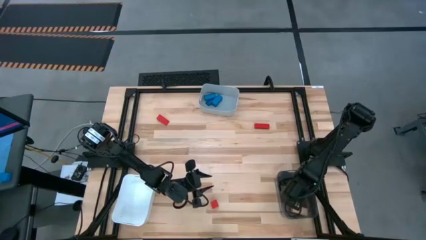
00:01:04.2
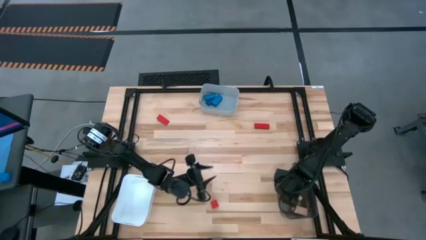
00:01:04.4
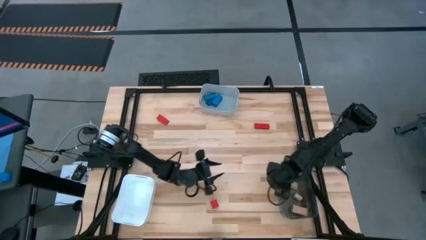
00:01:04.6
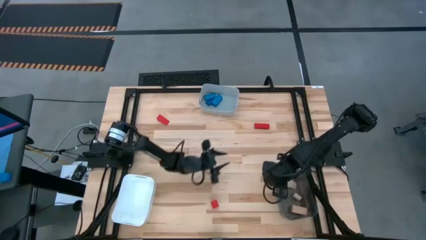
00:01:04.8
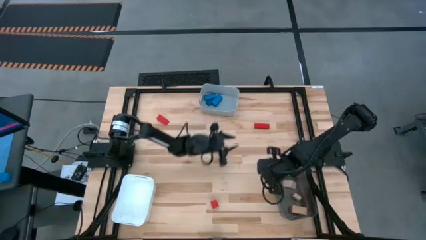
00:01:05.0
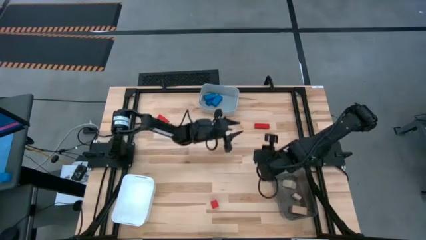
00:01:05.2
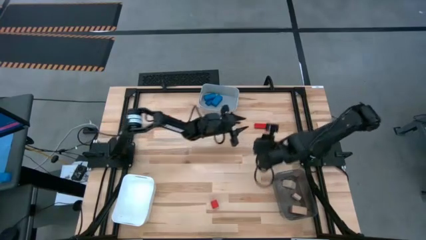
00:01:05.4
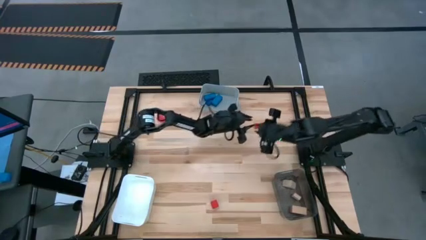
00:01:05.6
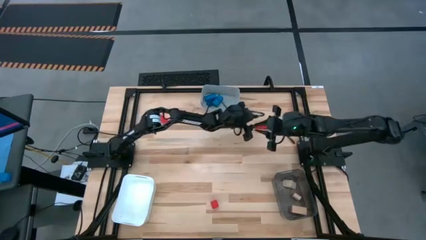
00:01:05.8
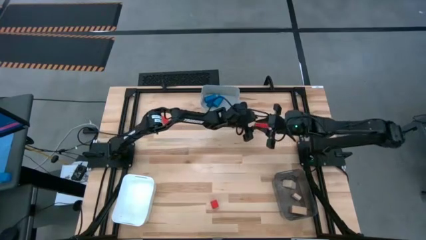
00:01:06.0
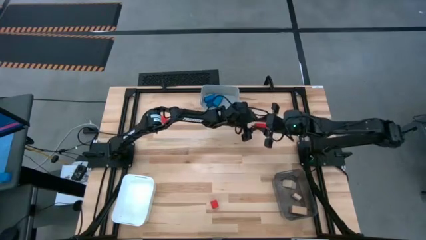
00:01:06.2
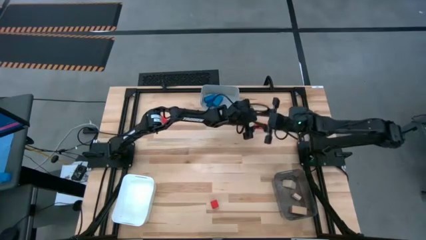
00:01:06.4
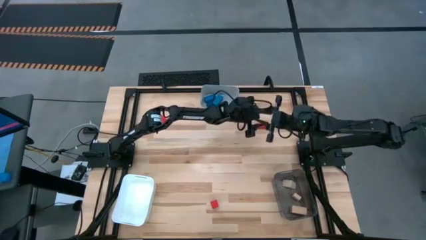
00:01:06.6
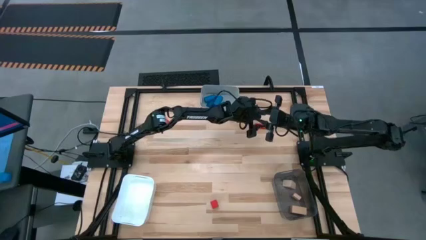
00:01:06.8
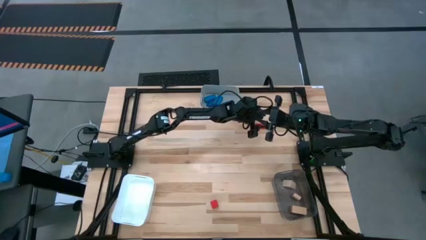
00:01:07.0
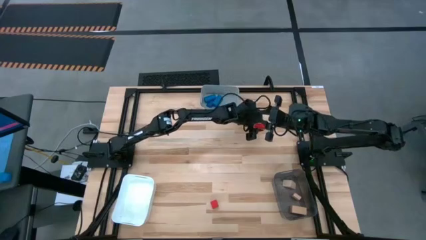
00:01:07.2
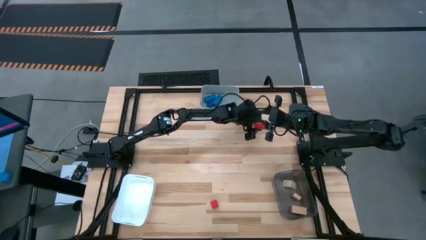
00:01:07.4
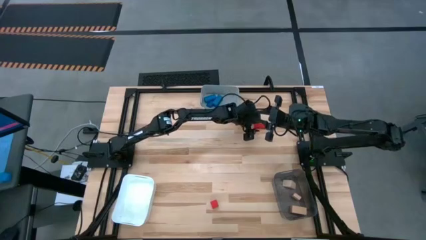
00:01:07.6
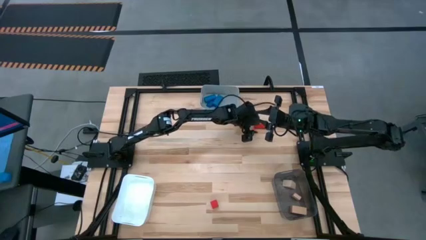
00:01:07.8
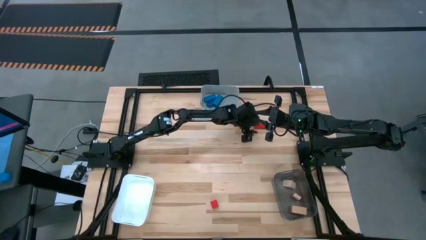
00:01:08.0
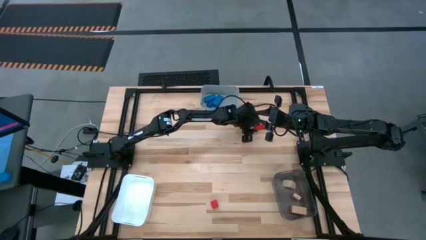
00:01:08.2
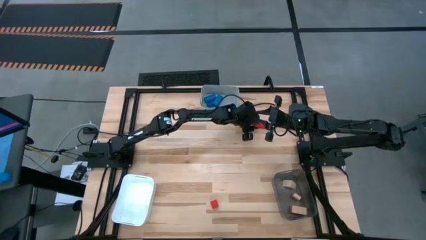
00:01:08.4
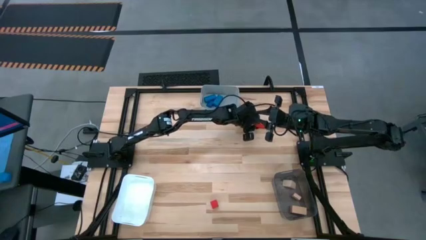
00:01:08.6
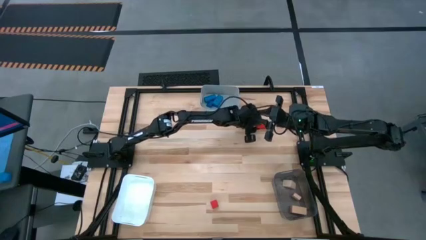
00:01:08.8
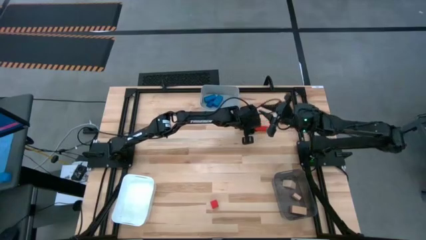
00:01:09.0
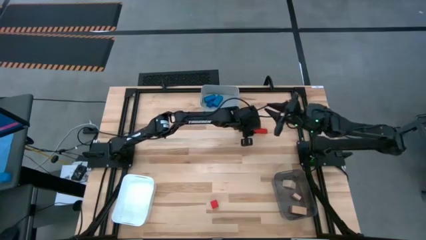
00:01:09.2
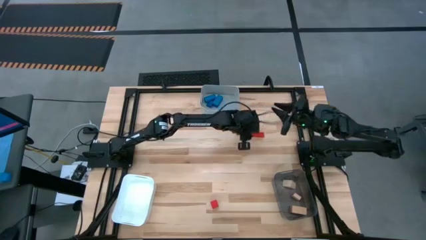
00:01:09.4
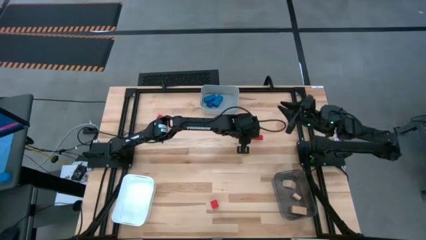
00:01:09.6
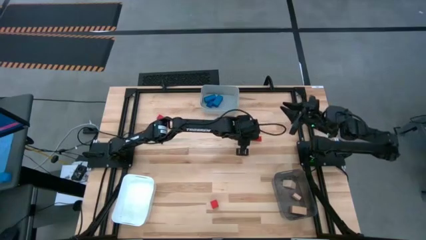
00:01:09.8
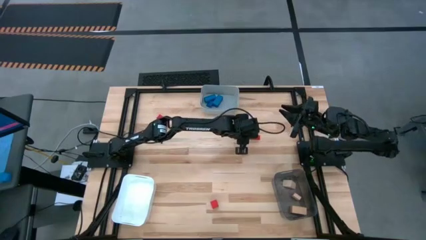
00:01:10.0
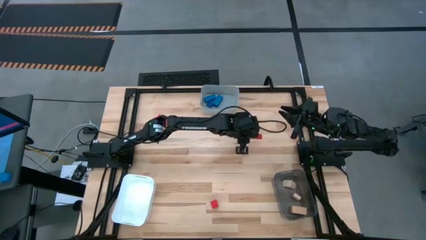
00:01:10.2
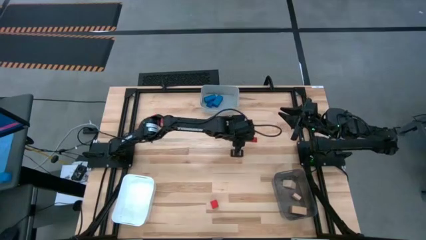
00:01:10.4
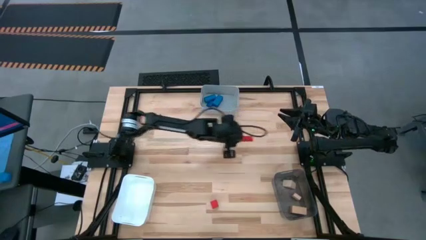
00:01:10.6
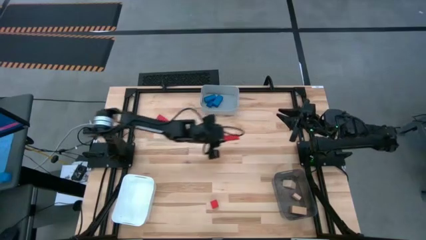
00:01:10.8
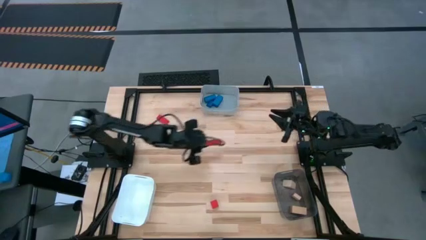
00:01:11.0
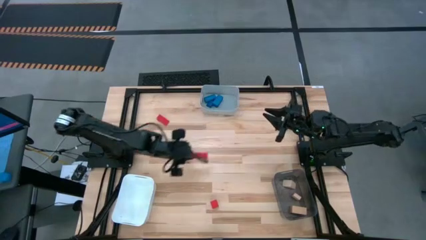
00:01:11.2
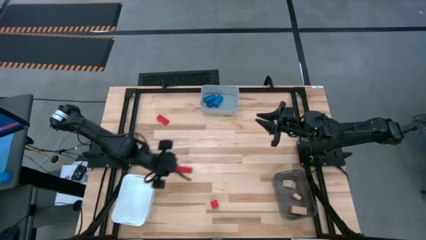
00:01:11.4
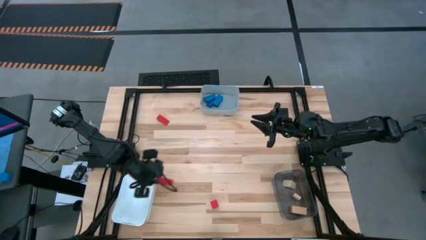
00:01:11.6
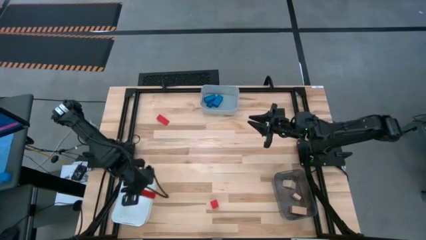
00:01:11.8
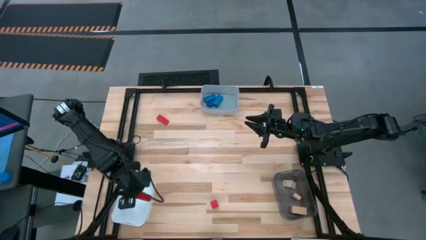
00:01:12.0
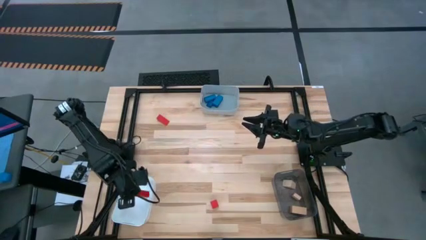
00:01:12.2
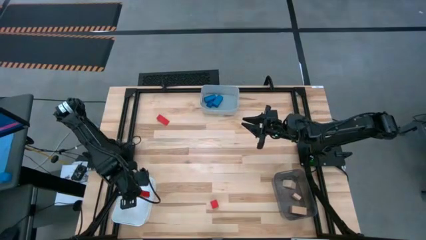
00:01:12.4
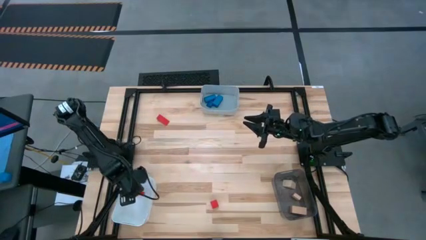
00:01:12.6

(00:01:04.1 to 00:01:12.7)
Task: Sort & place blocks by color
Put the red rectangle block into the white bin

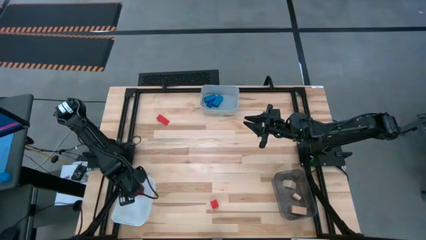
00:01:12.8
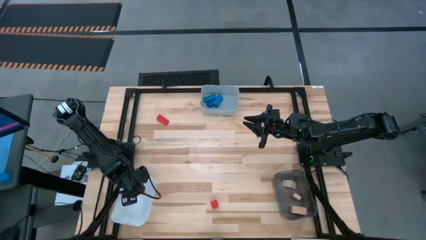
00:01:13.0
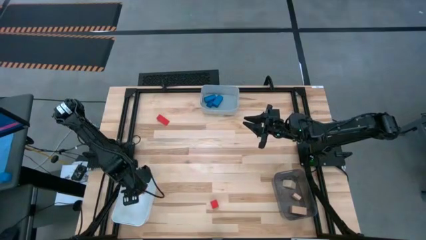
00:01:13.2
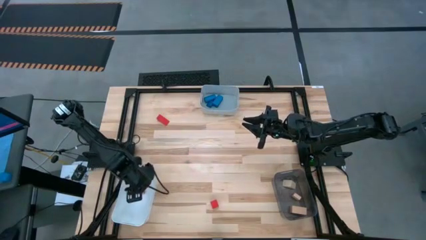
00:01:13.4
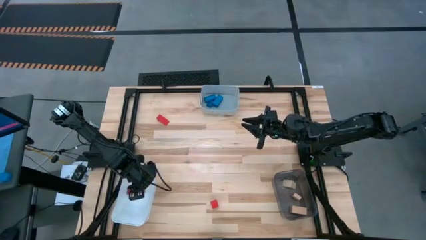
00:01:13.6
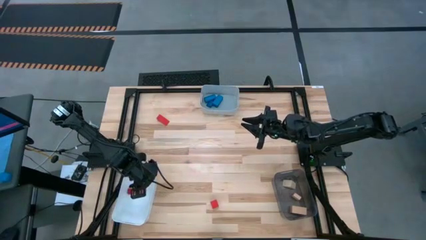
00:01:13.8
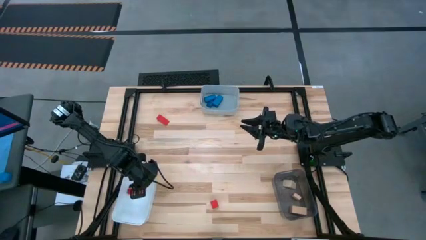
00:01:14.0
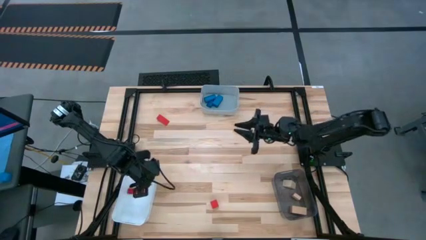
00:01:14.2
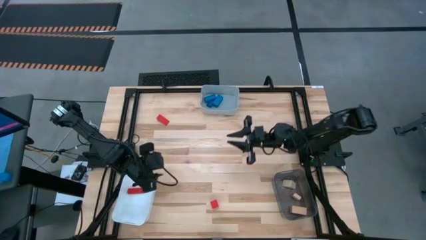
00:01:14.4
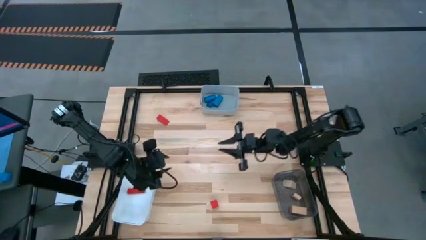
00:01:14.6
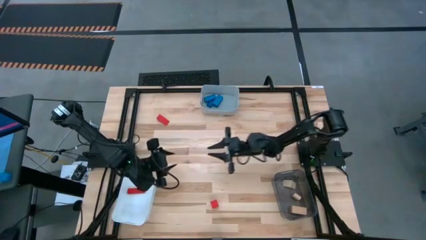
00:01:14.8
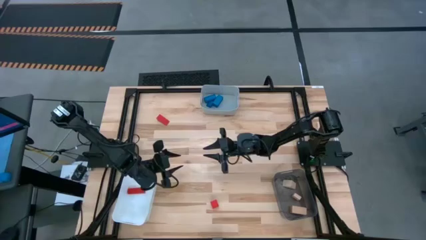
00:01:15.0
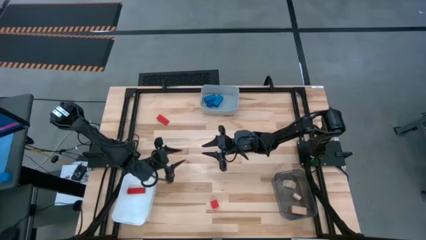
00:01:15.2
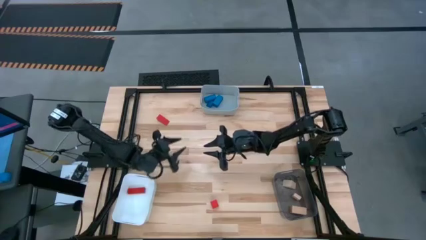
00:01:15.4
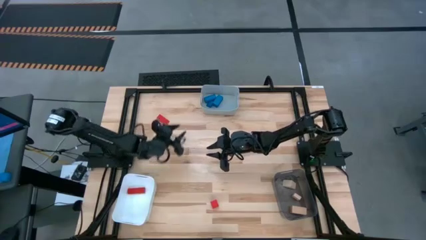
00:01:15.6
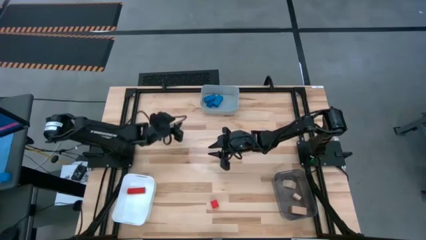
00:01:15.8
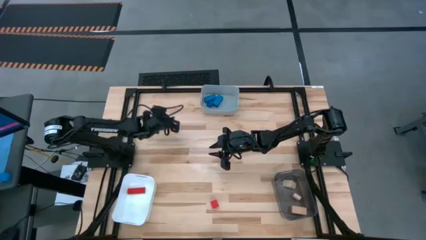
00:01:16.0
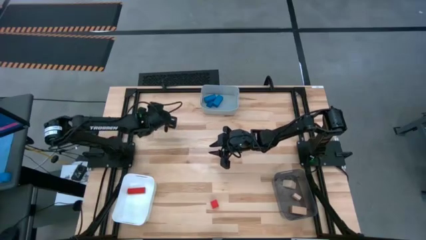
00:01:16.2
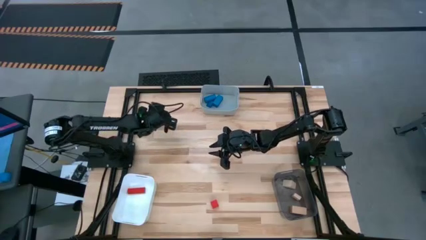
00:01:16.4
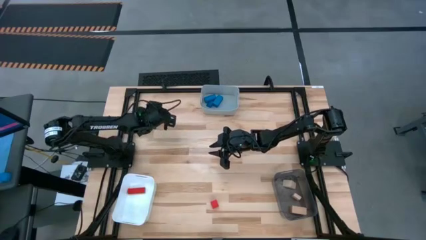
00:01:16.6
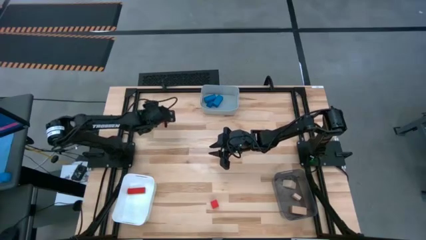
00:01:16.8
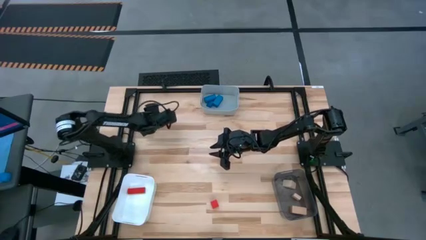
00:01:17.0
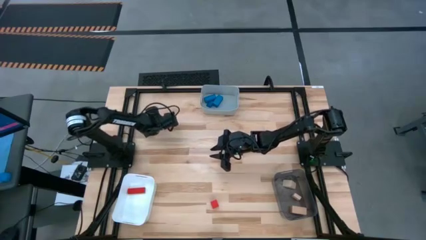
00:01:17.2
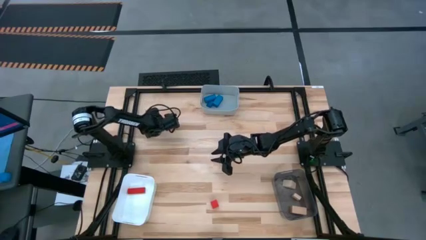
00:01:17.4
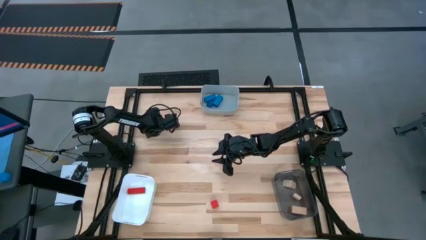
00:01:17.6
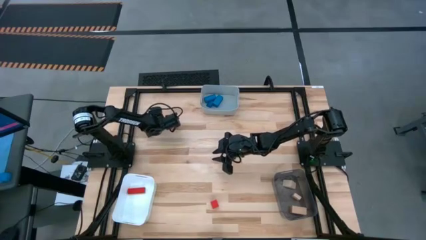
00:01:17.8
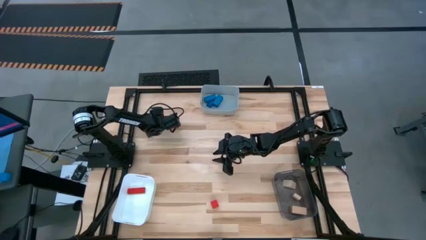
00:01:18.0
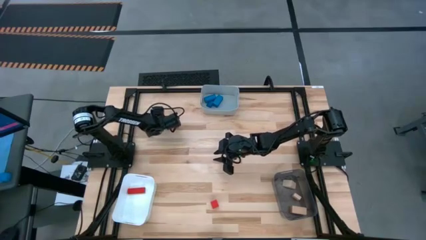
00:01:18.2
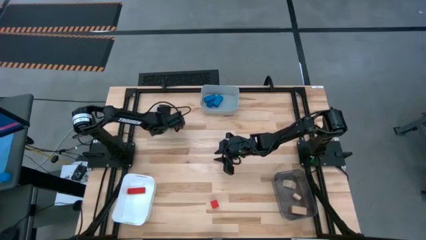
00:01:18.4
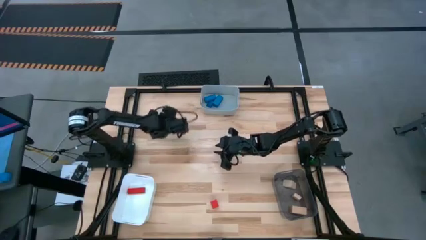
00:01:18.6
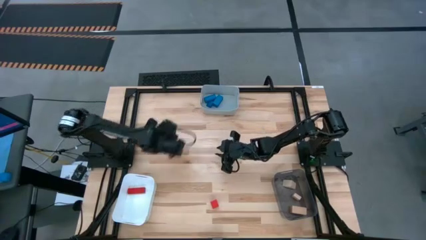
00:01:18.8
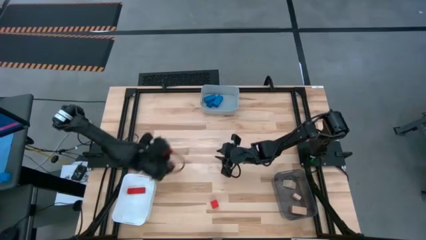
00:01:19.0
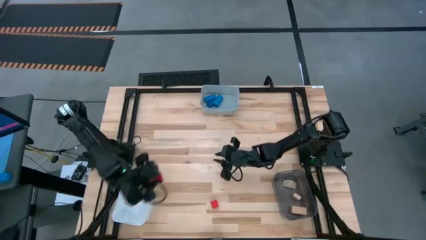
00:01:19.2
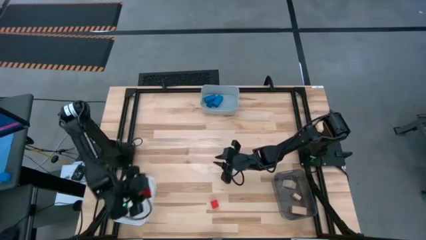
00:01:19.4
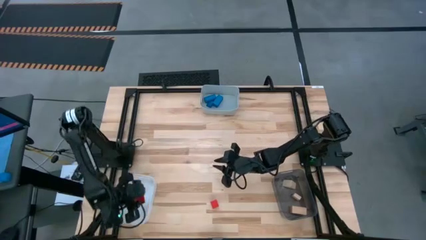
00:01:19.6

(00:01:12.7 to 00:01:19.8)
Put the red triangle block into the white bin
